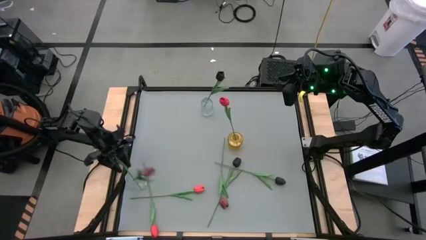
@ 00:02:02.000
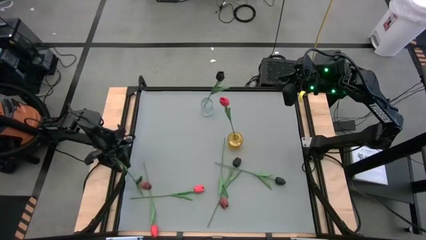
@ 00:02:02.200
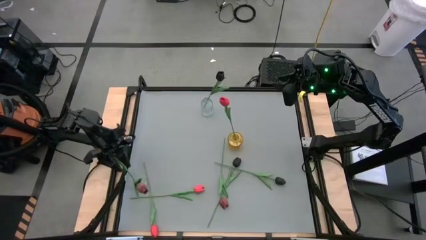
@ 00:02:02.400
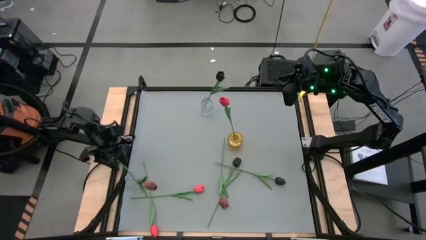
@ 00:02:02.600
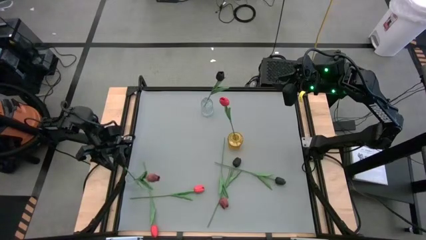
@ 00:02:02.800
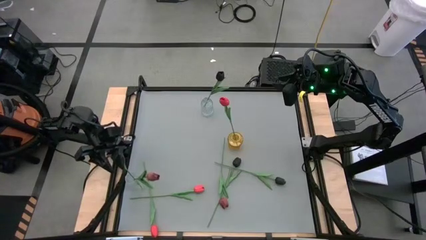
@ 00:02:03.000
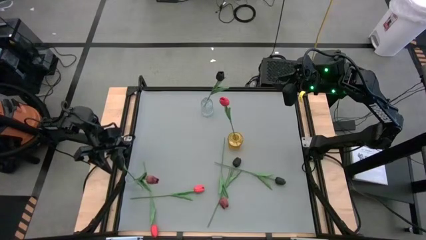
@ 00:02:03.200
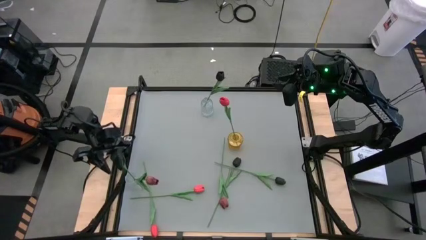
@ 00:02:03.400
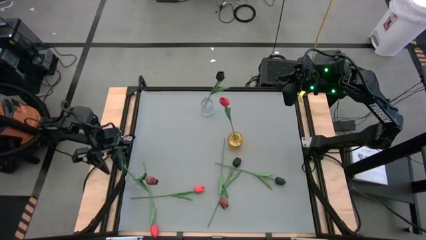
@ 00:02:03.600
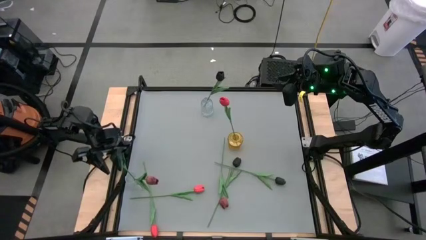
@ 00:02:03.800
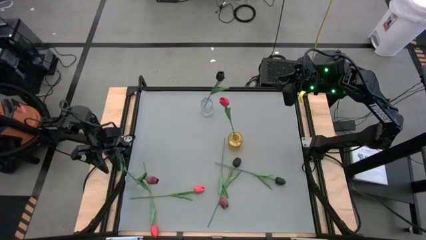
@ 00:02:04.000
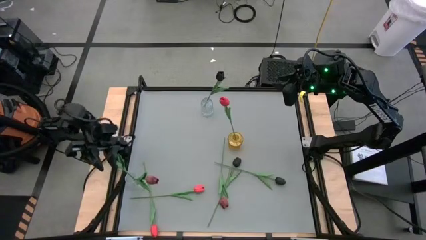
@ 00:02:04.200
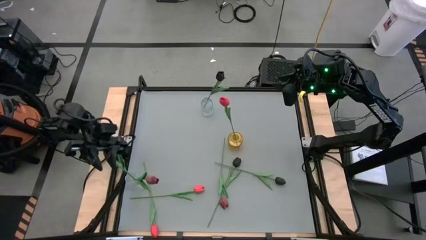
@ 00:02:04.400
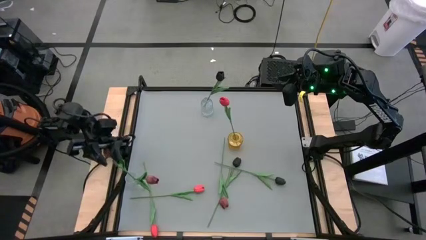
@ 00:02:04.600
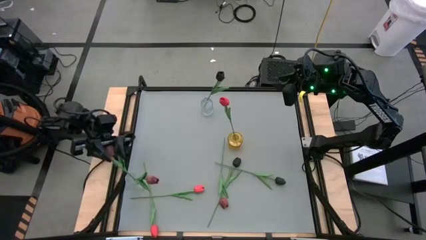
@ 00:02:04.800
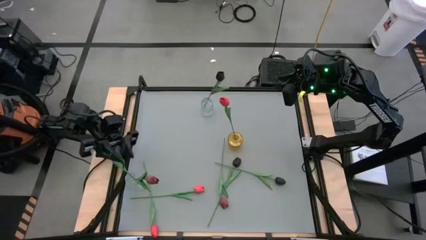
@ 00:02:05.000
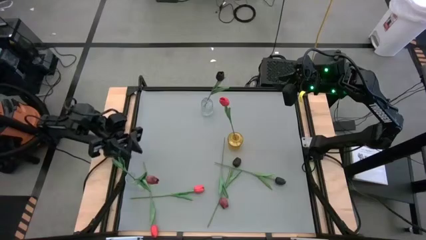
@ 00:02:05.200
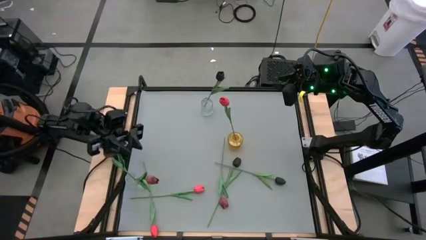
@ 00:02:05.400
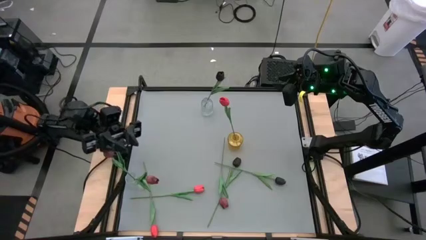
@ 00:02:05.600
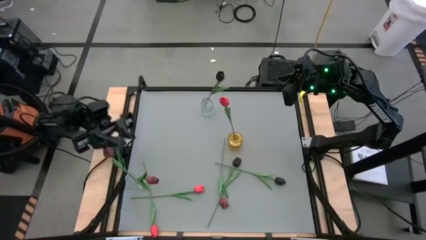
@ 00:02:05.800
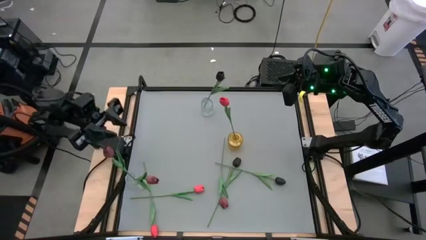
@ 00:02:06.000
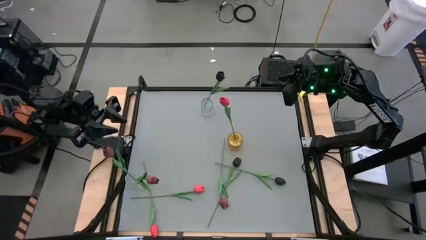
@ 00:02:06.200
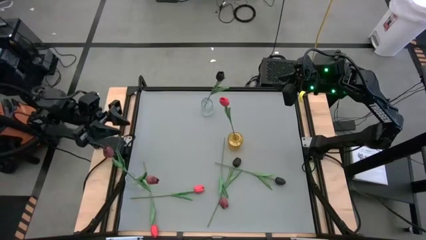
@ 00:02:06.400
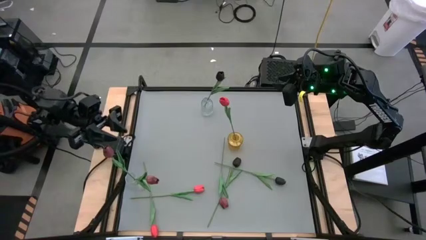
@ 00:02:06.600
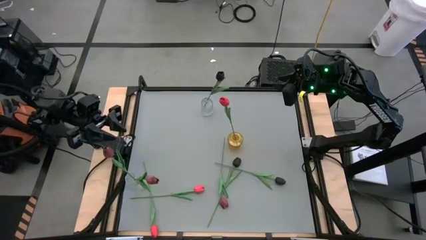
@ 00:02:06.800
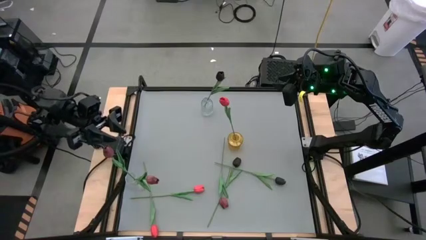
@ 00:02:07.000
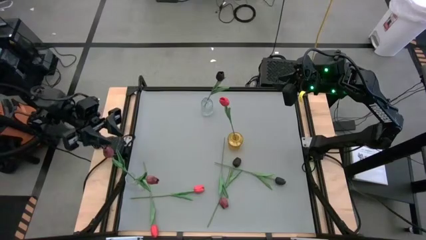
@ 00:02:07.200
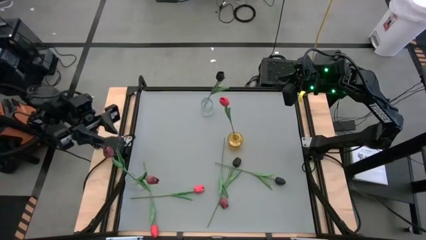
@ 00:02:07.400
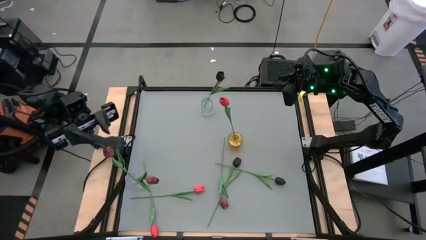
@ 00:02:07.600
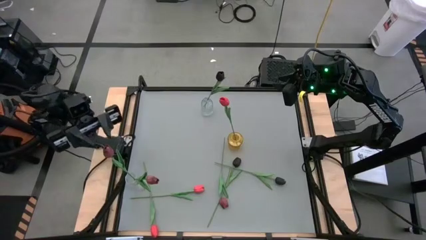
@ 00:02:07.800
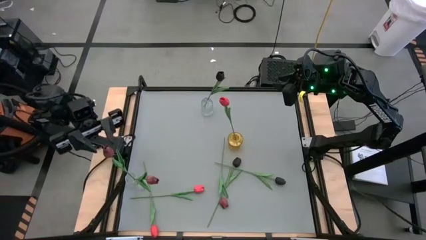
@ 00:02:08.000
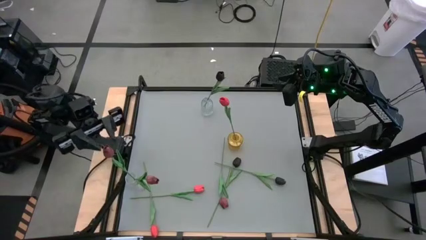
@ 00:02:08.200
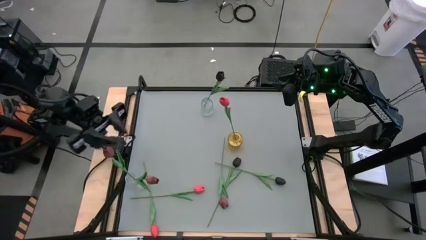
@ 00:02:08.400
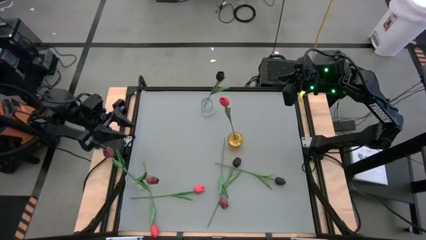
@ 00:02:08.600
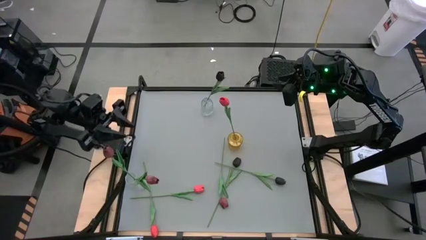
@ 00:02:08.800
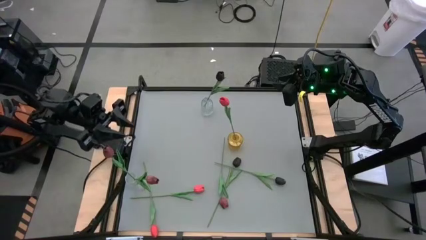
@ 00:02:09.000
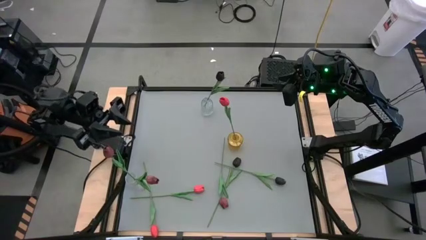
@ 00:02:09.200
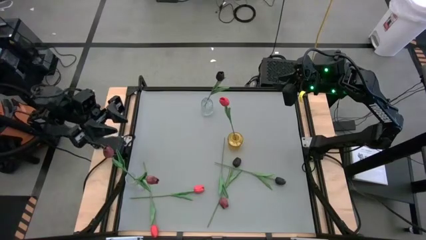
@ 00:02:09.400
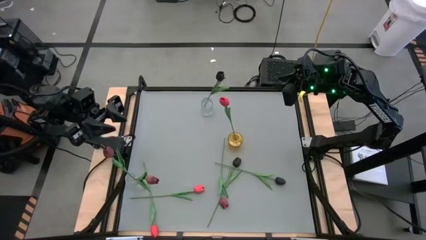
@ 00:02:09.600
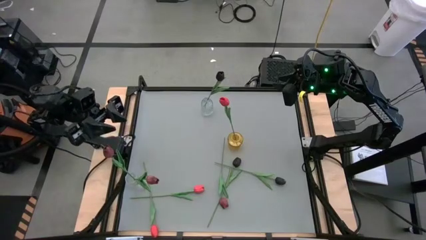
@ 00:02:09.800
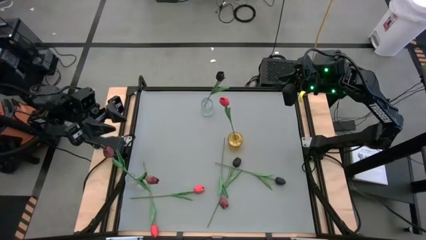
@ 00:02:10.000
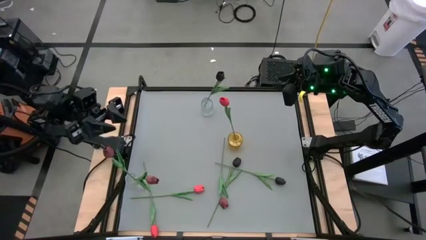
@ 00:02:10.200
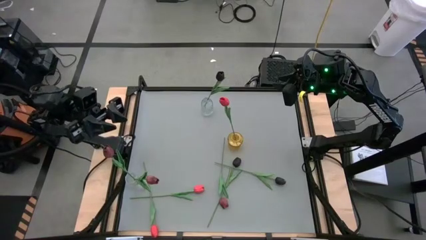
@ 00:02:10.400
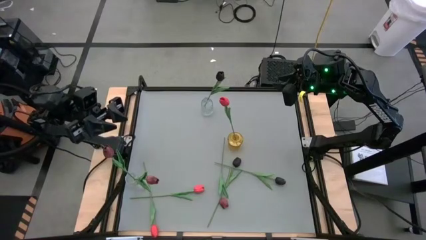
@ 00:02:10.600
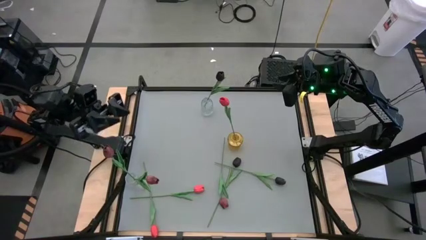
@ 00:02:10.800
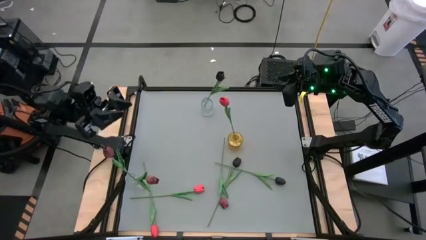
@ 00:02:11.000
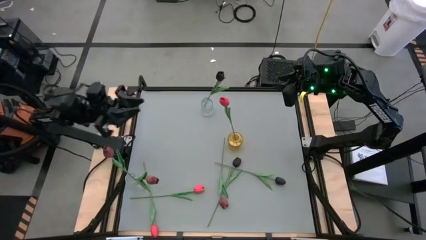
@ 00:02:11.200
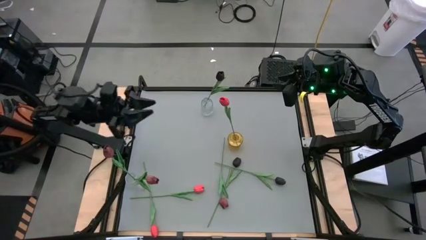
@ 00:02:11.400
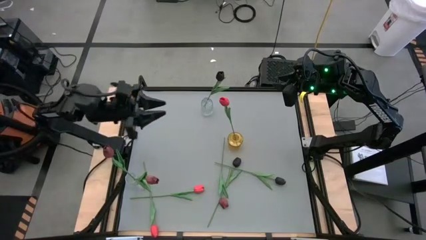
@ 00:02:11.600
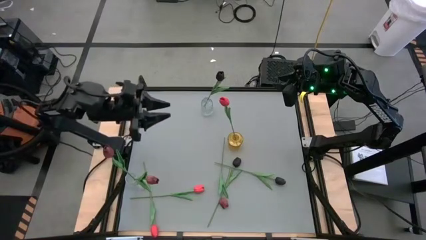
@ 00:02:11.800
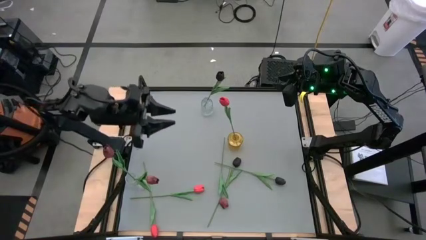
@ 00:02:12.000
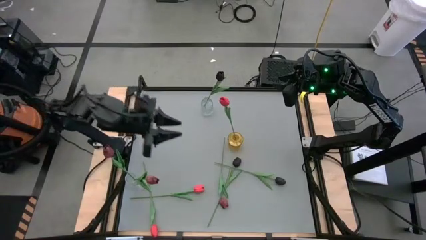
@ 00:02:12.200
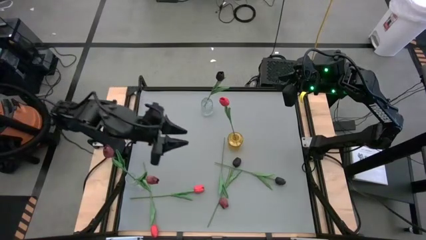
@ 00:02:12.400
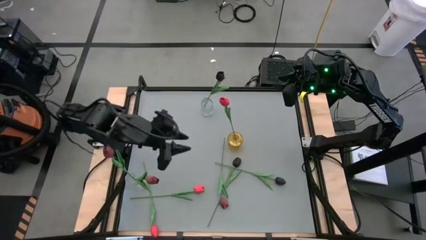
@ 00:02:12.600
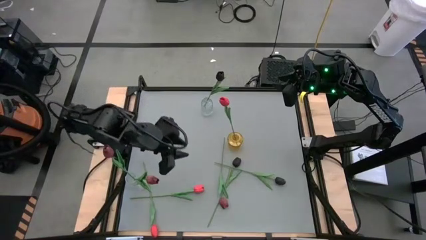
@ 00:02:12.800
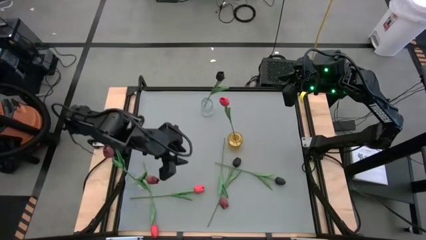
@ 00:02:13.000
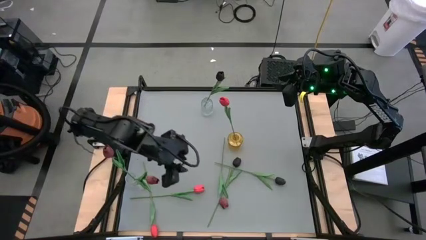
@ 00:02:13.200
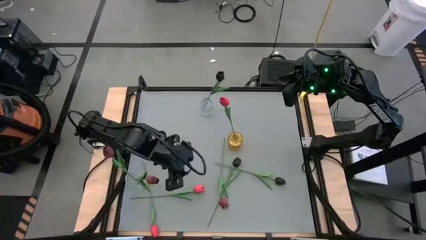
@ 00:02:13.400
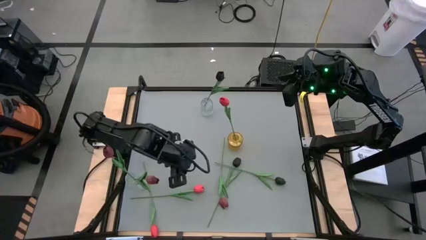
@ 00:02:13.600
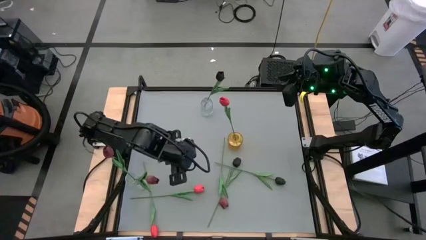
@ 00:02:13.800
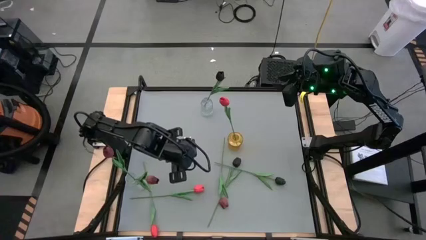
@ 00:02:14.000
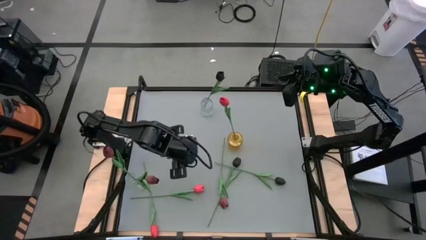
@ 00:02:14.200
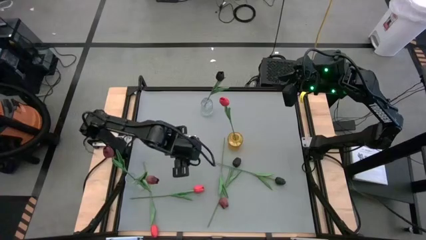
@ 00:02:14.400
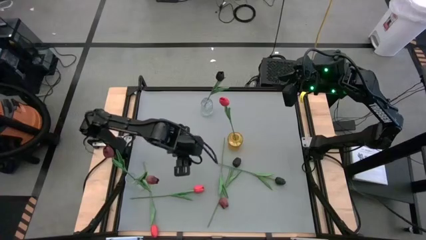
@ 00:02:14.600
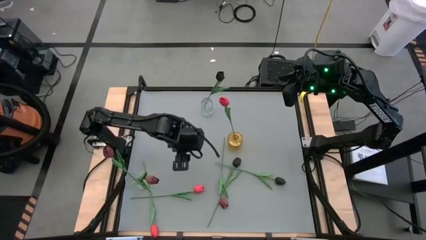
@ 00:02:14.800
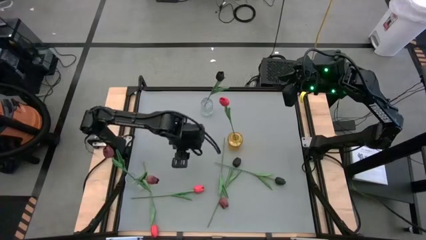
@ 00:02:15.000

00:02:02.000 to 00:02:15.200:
Task: Sort flowers into vase by color
Put the right pink tulip into the yellow vase

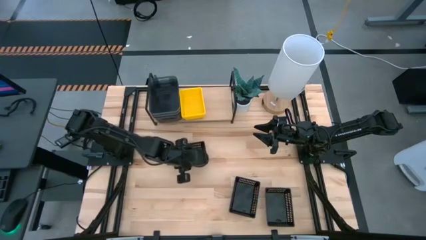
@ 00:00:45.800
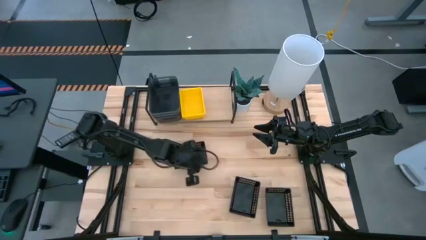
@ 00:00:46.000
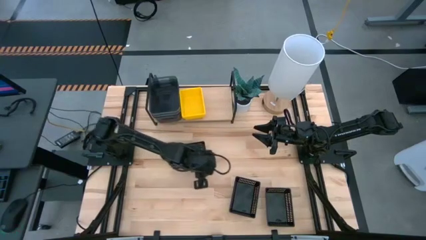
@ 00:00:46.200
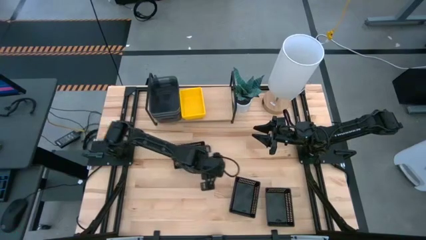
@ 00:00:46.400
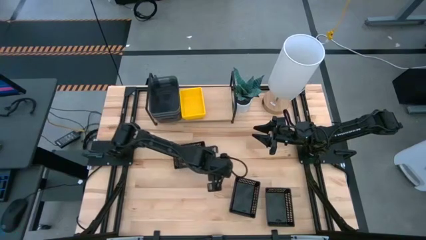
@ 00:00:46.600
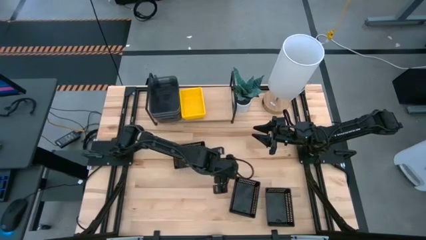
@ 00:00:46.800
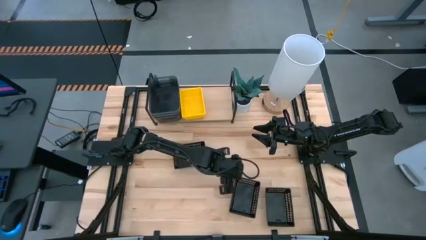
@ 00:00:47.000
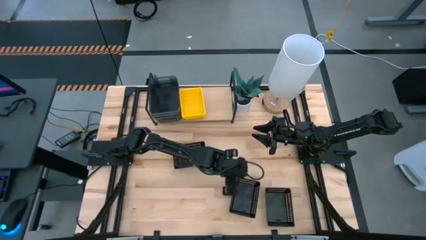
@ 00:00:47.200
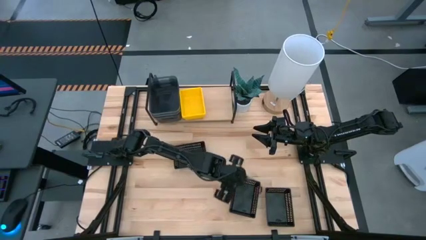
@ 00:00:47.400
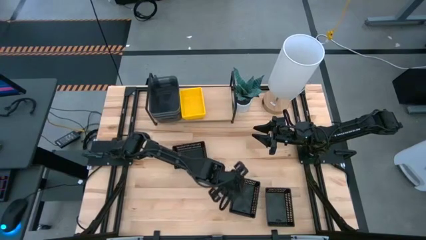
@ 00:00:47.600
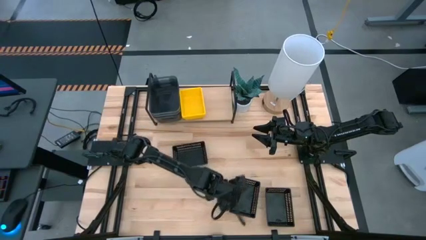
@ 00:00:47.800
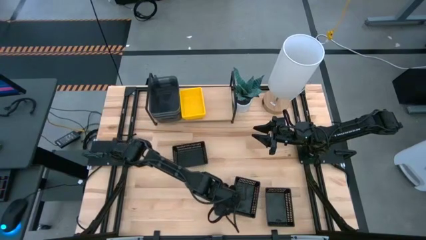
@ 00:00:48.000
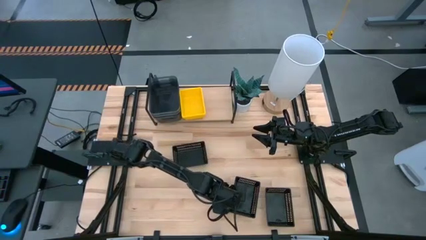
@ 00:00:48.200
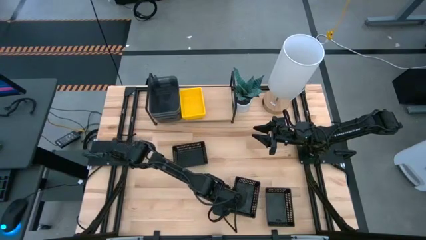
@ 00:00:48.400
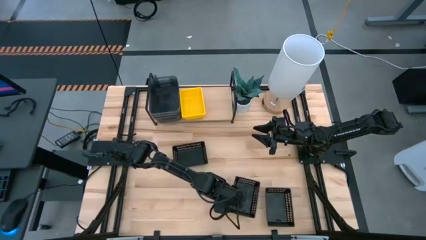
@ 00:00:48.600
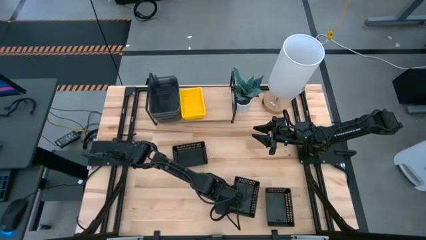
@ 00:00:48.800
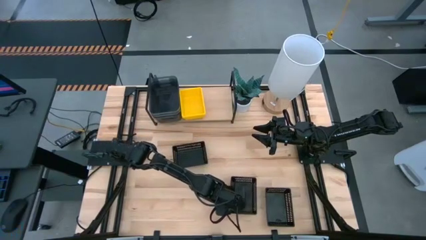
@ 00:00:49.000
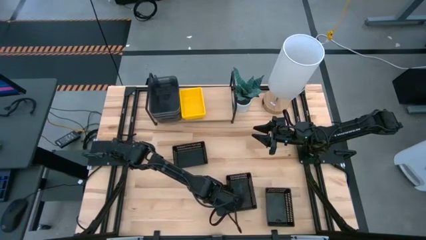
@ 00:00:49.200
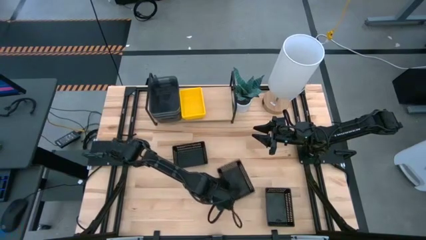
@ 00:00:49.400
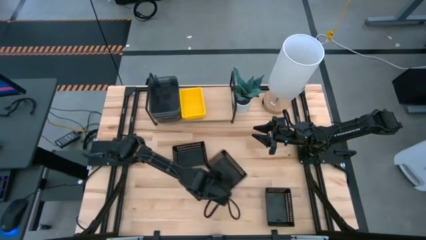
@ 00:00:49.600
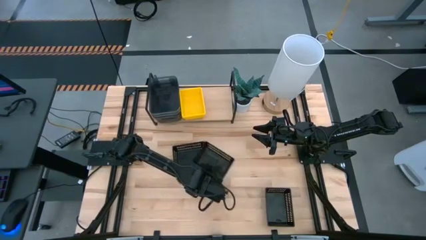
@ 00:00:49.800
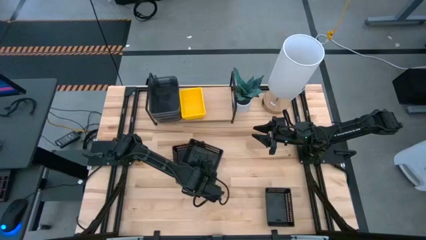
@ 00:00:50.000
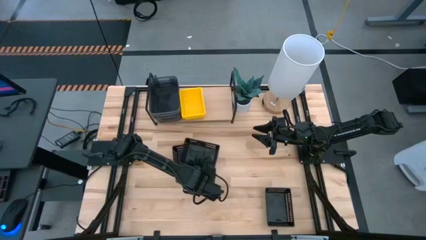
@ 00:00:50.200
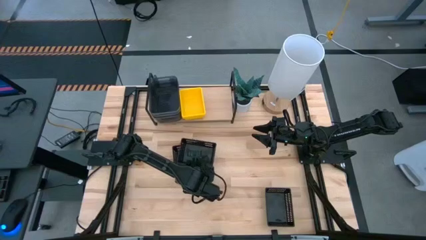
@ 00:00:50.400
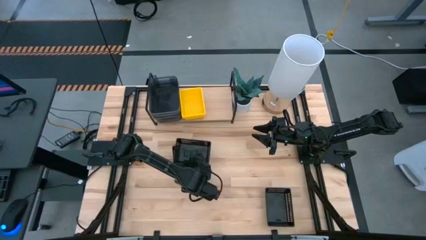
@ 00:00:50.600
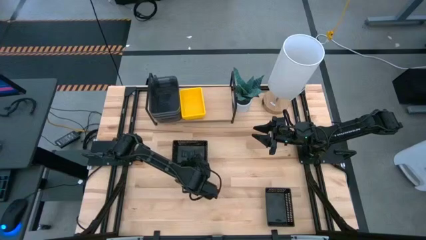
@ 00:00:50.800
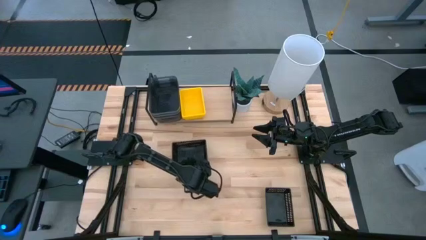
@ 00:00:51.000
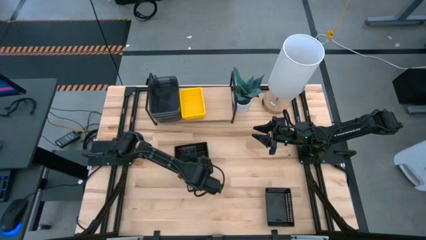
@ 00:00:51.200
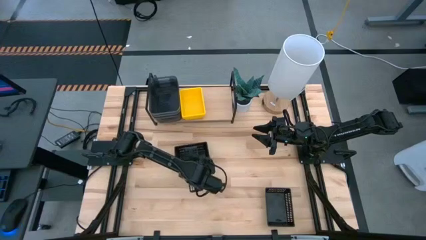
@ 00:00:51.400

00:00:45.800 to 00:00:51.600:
Task: Stack baskets on shelf by color
Stack the middle black bin on top of the top black bin
